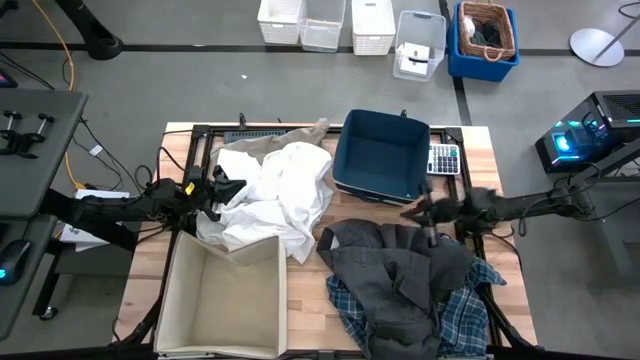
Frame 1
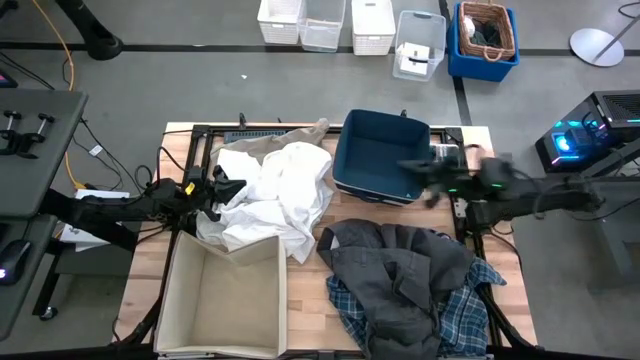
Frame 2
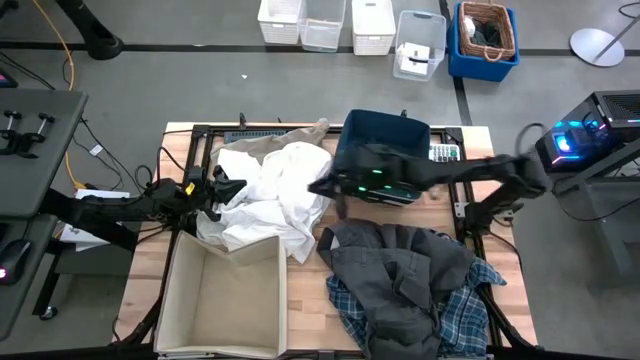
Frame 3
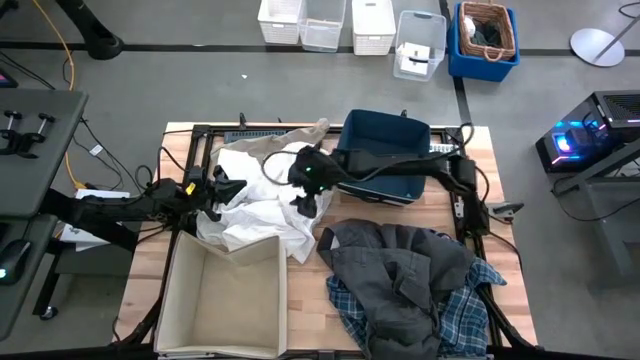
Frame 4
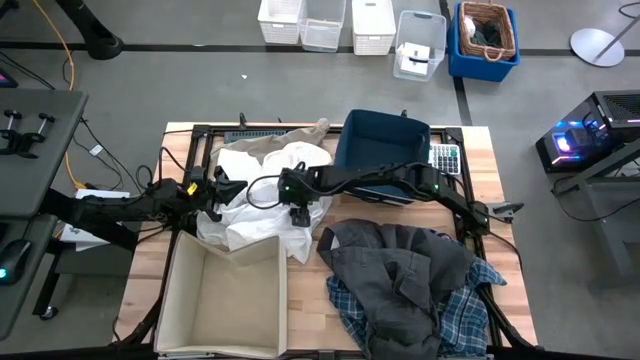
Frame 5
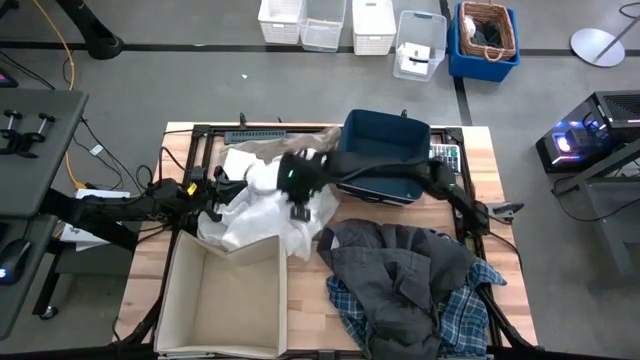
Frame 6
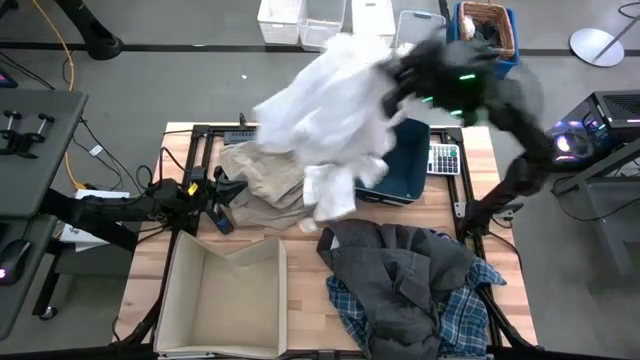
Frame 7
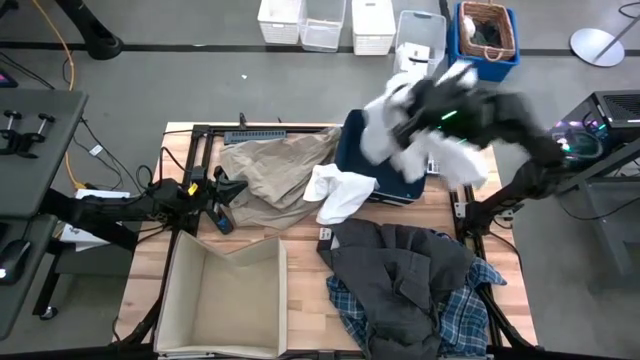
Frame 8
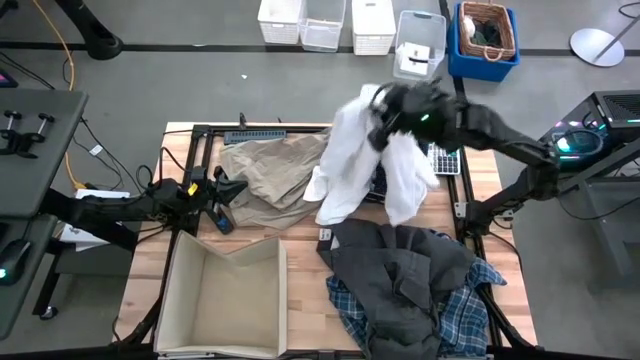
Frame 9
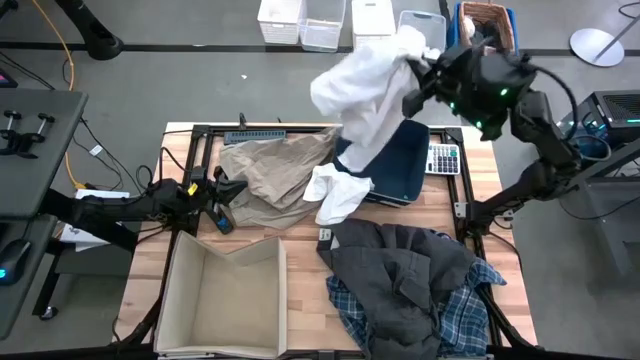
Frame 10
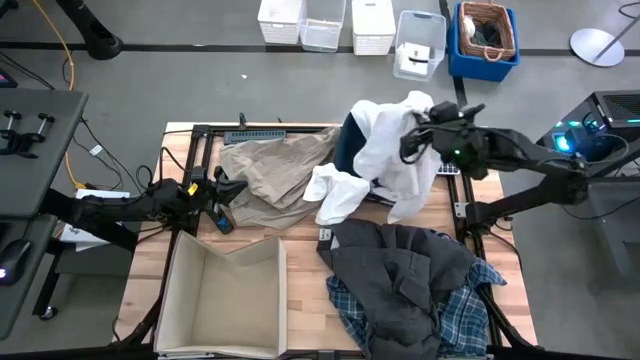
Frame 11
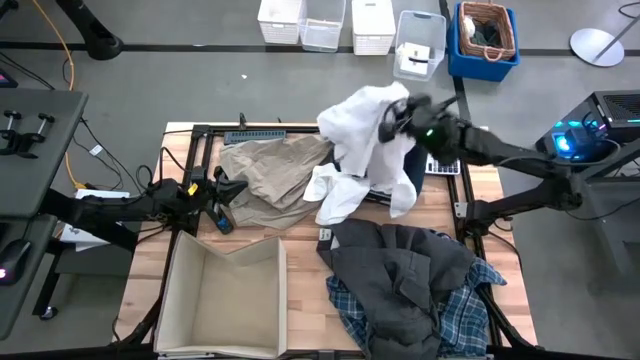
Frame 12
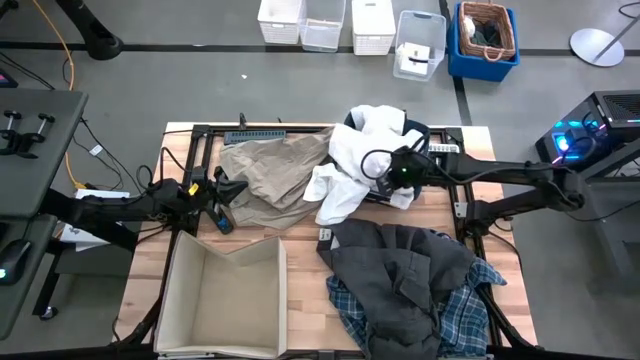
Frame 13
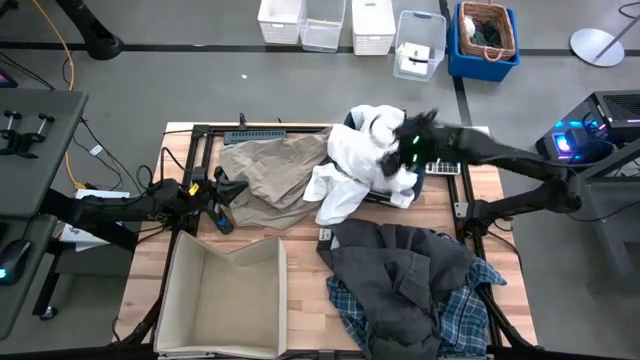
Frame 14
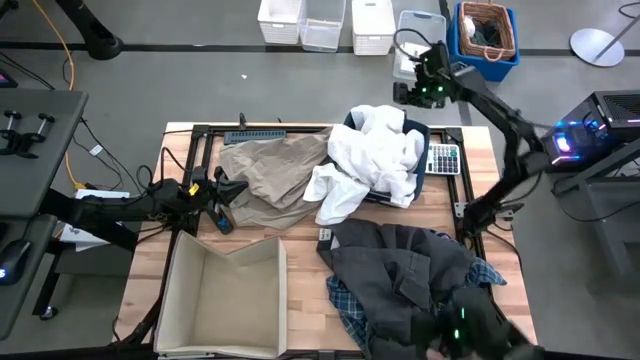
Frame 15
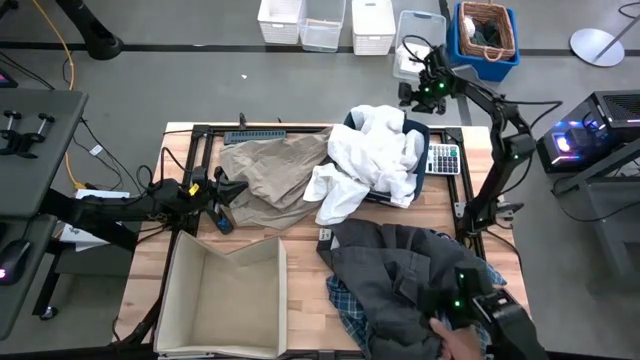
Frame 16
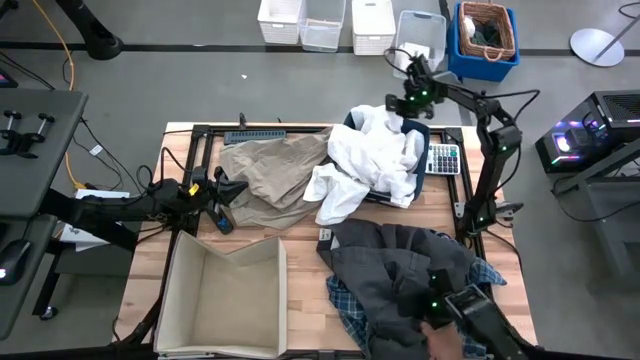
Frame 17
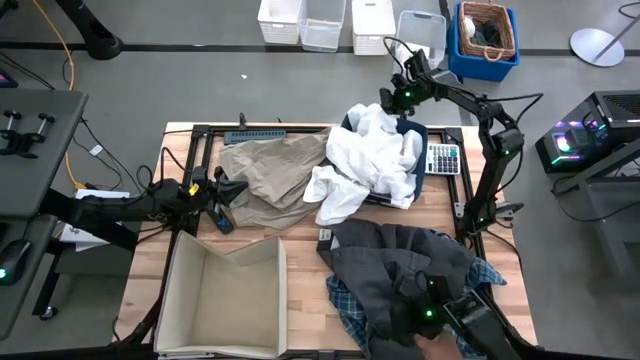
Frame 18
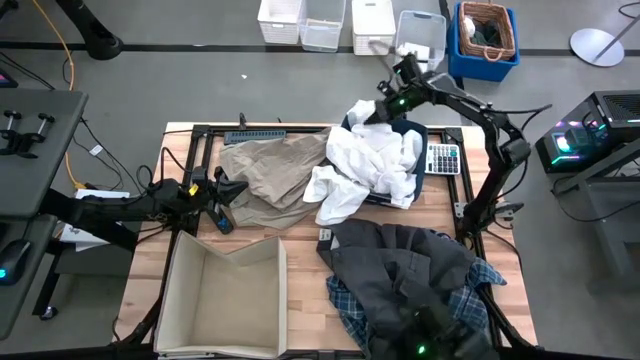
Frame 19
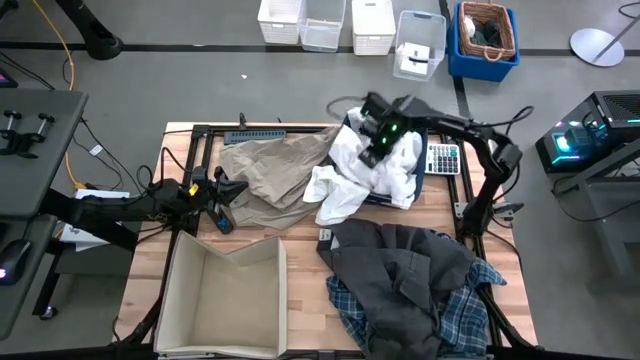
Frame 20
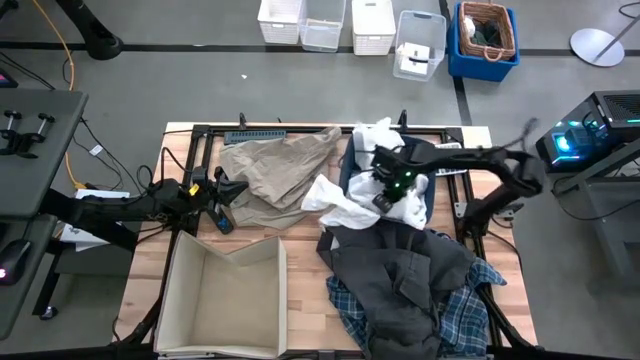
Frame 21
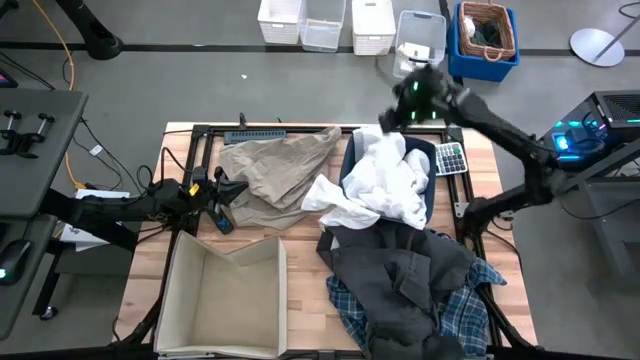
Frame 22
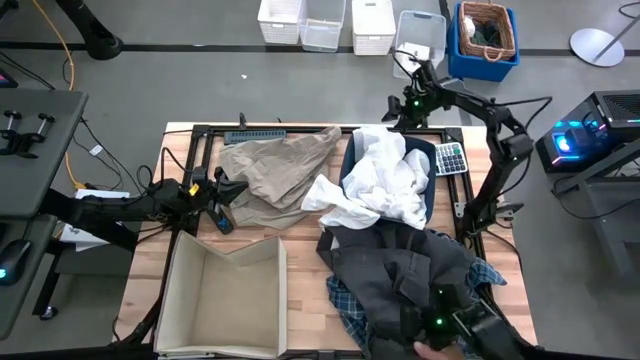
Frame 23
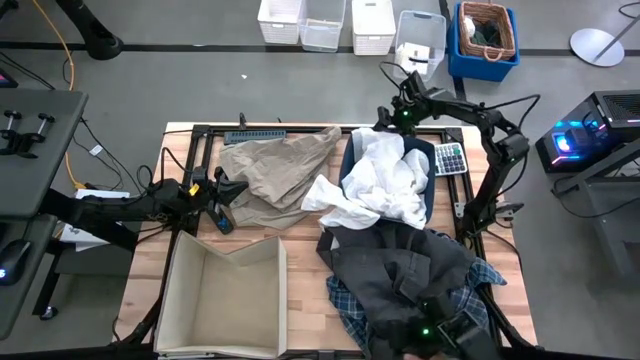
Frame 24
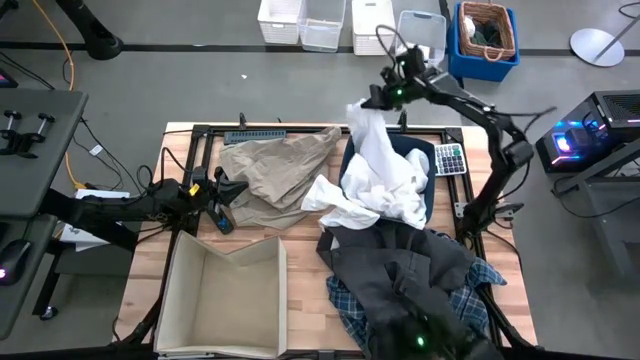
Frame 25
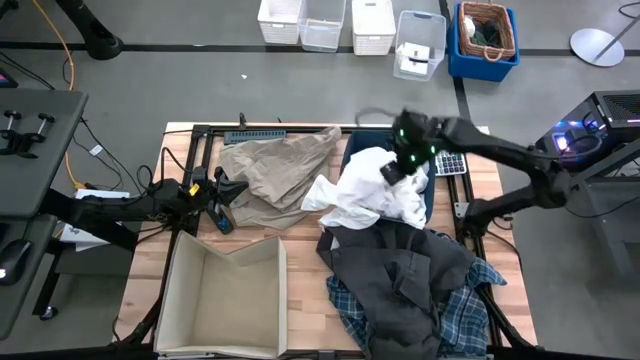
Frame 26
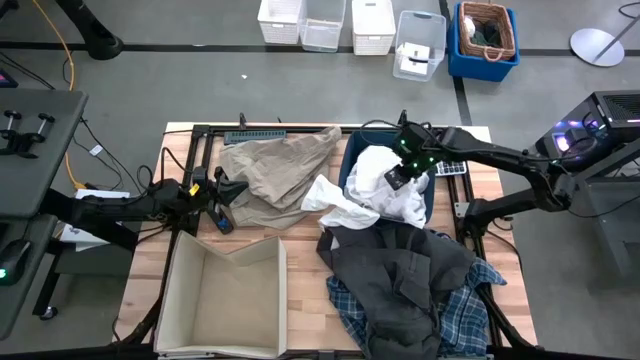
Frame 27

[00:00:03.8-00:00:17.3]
Task: Sort clothes
Put the white polo shirt into the blue laundry bin

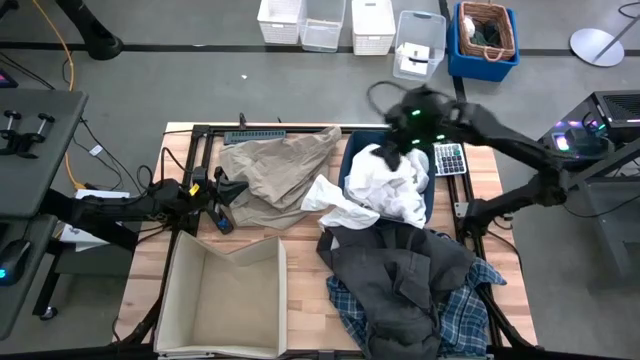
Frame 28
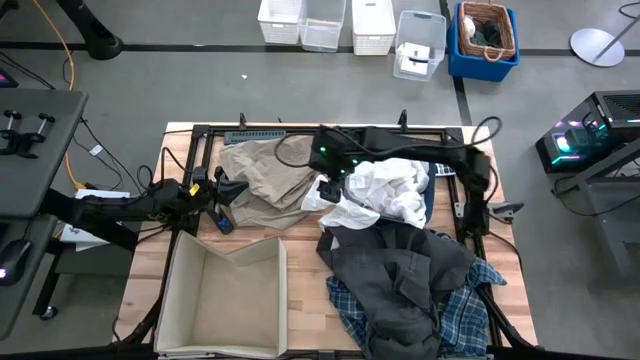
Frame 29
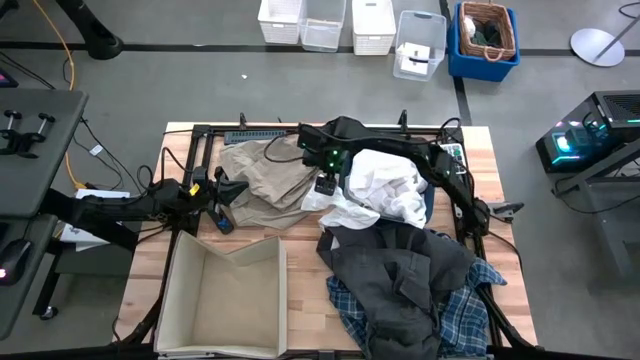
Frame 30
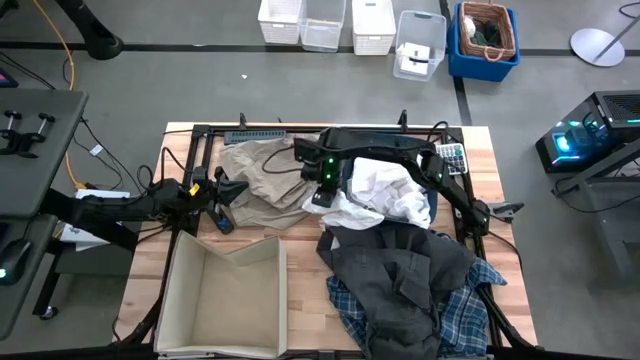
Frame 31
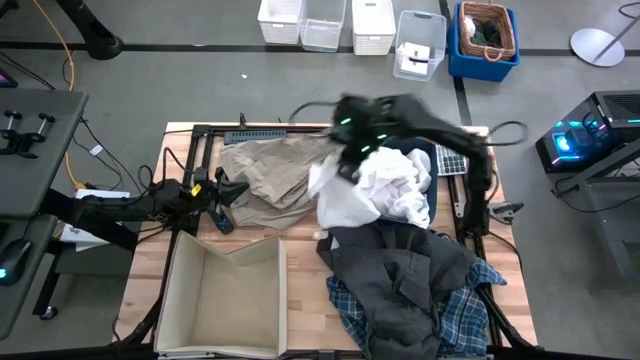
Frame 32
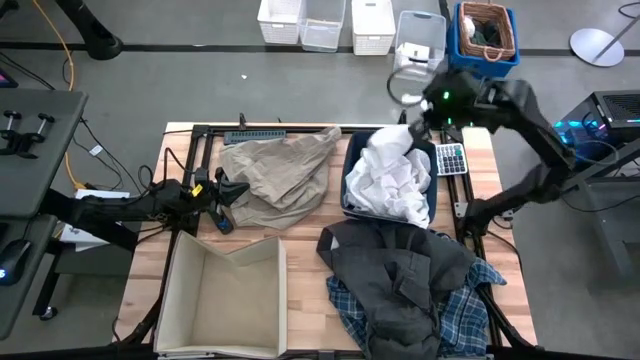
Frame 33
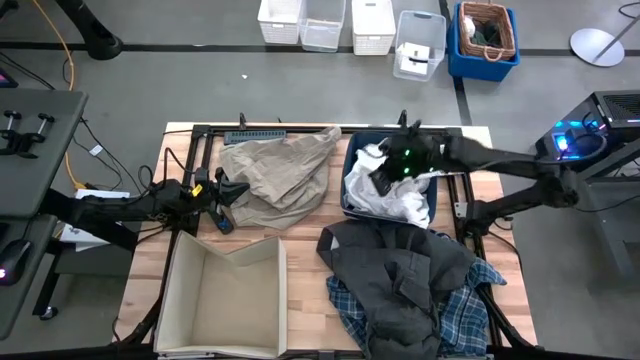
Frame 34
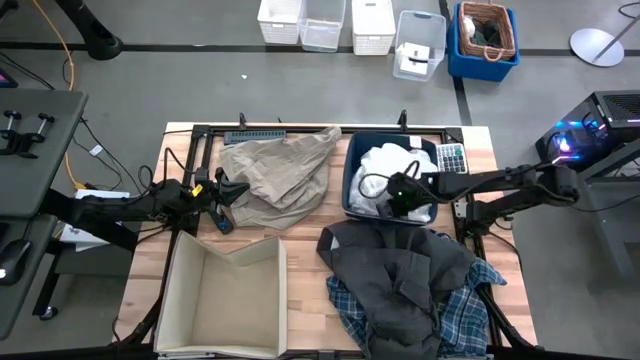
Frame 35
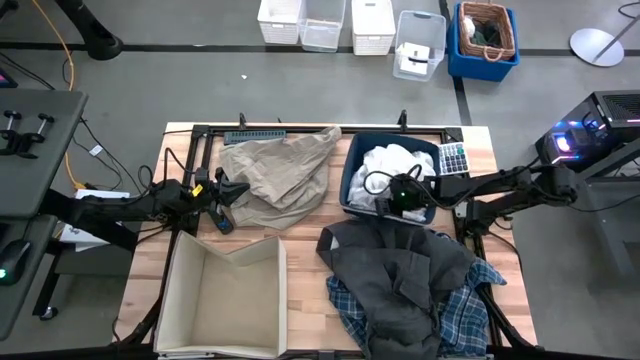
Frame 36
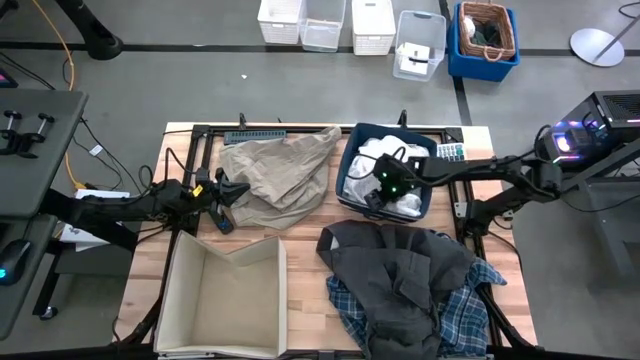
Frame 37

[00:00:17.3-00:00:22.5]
Put the white shorts into the blue laundry bin

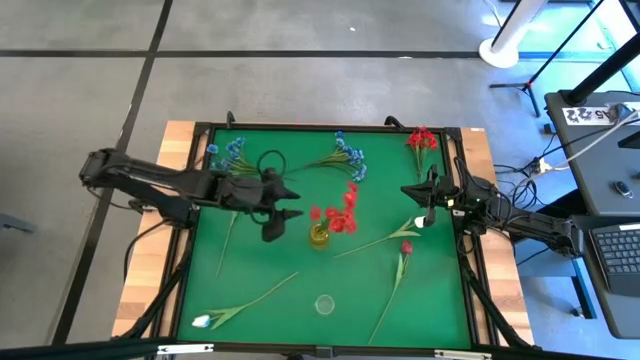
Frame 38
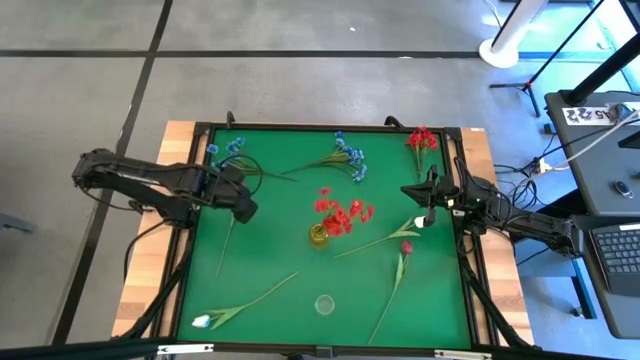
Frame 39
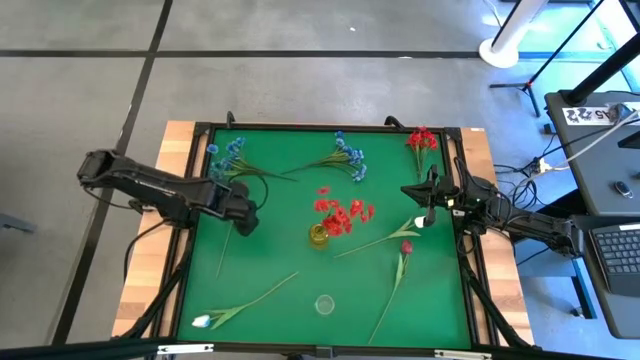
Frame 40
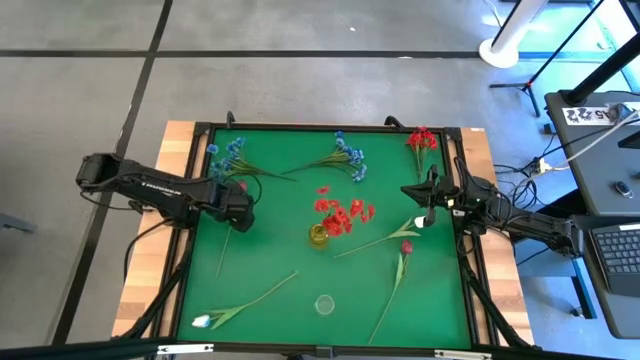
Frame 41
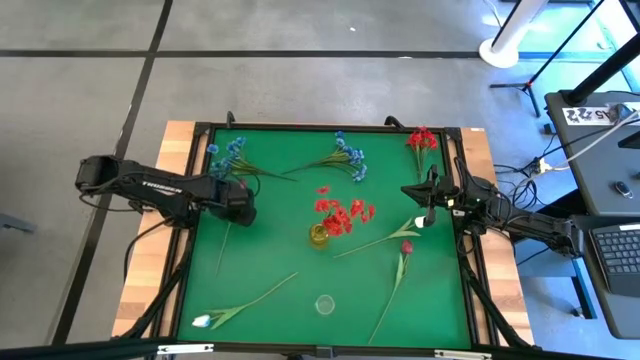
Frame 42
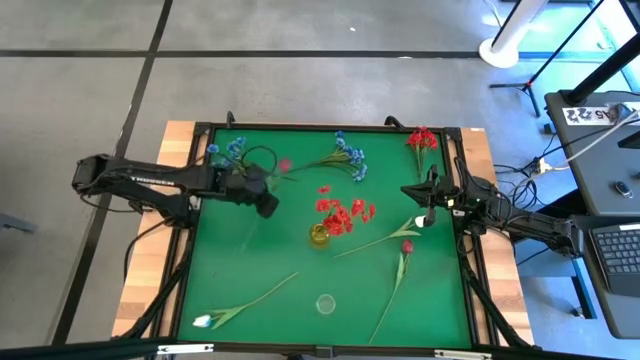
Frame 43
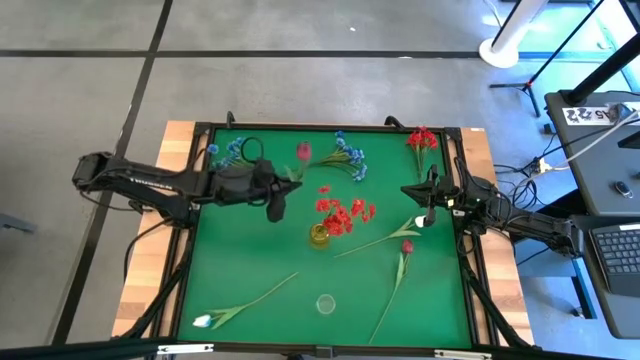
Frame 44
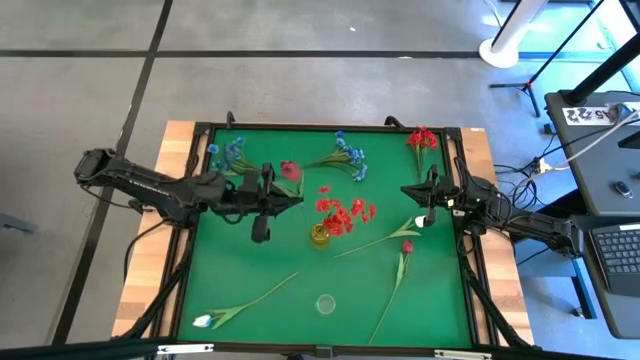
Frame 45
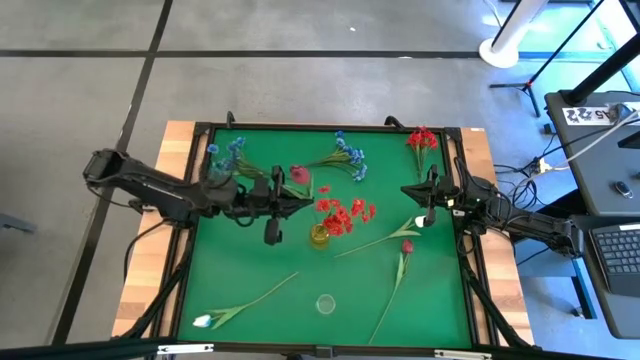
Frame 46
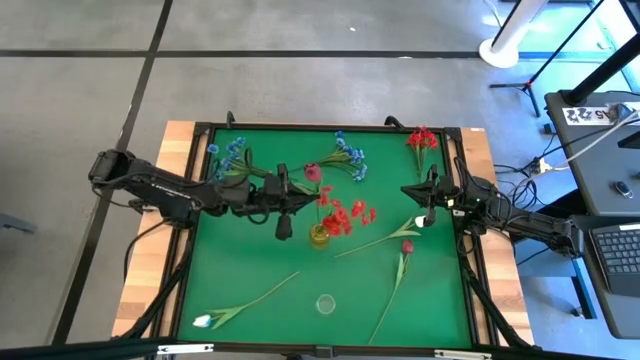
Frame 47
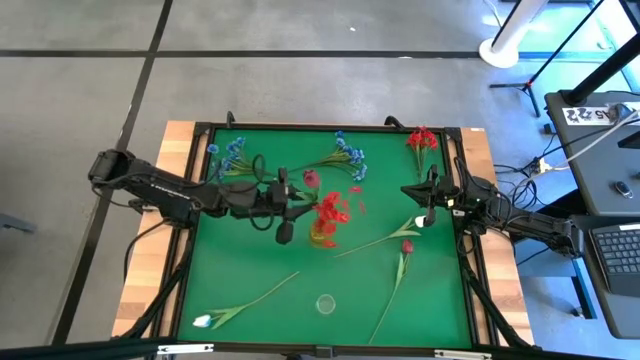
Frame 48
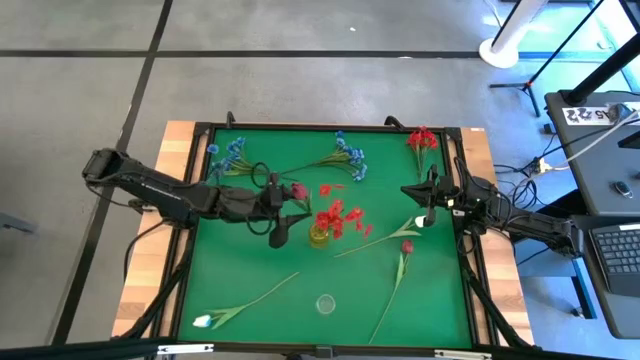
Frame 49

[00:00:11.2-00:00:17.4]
Task: Sort flowers into vase by color
Put the left dark red tulip into the yellow vase
